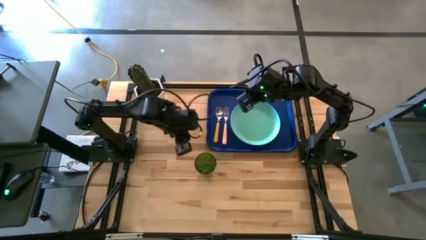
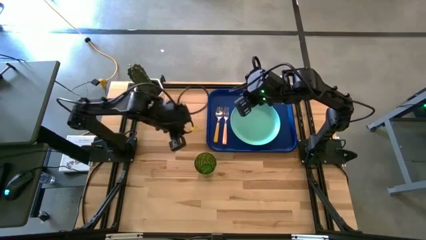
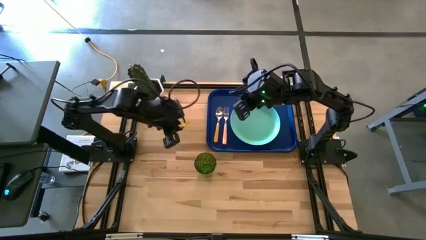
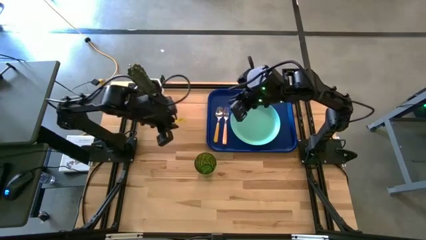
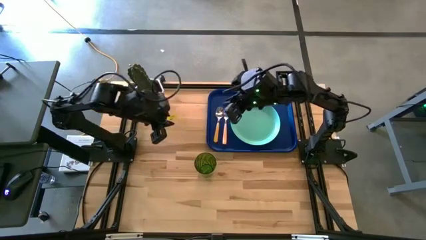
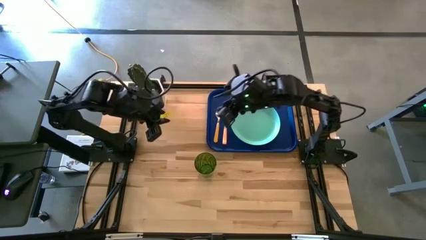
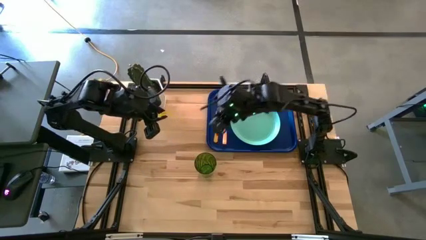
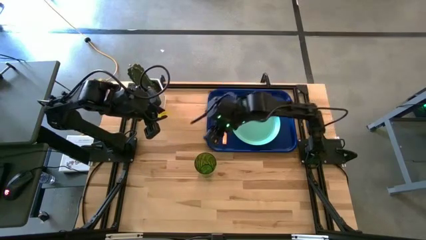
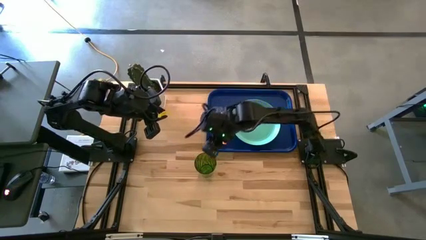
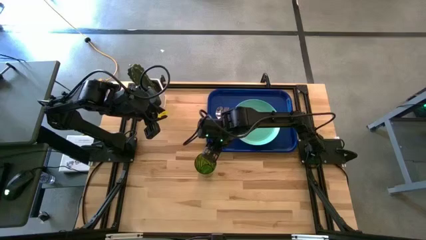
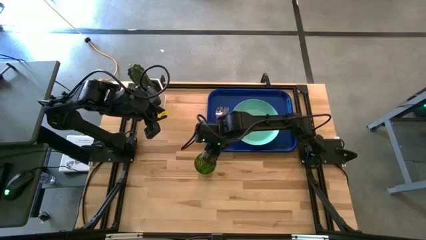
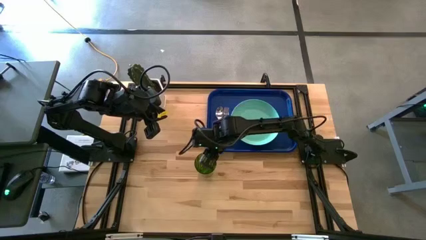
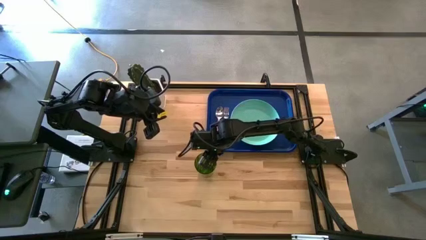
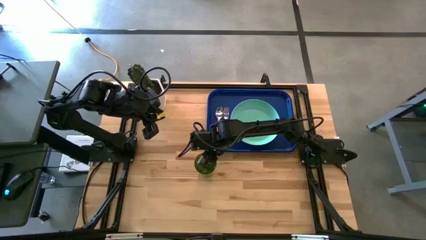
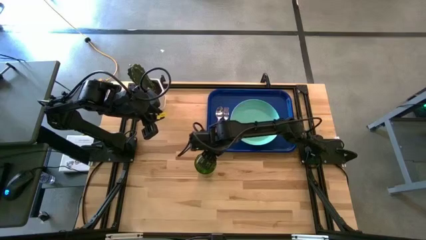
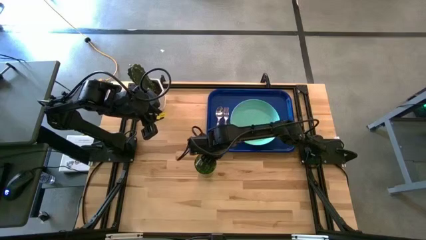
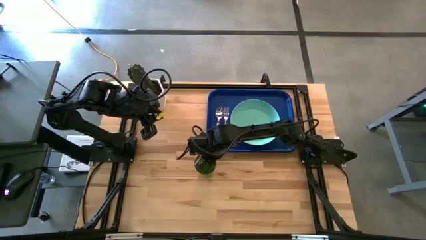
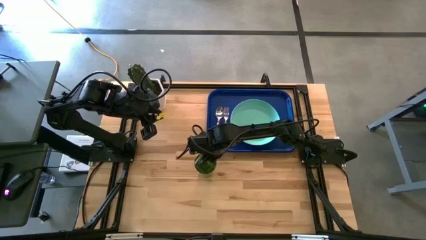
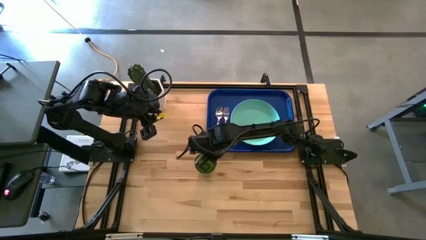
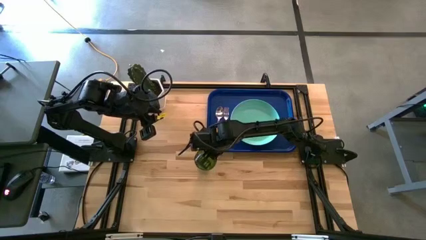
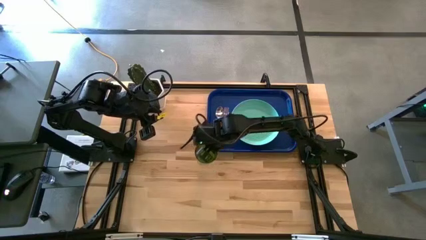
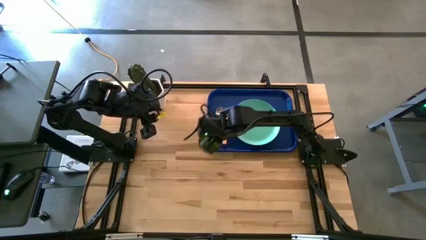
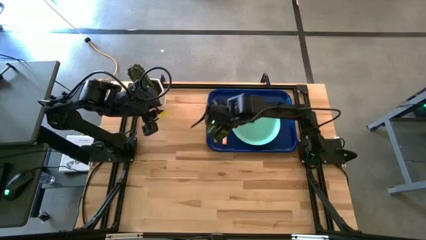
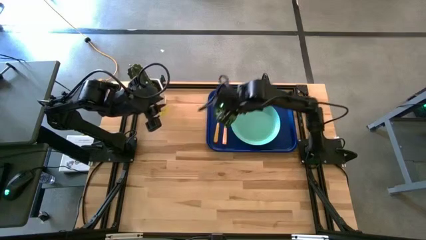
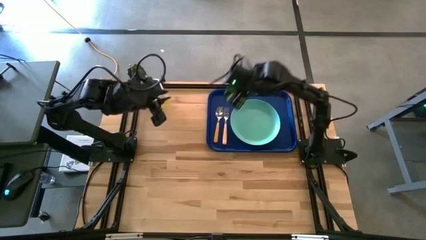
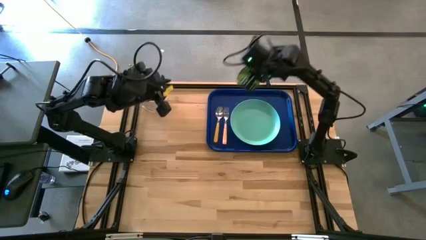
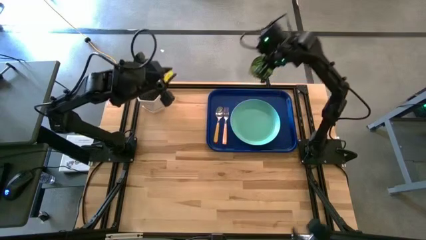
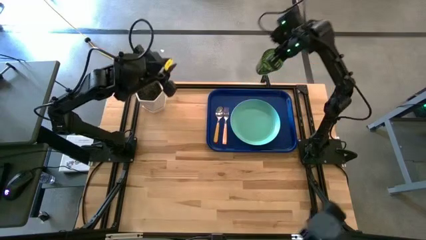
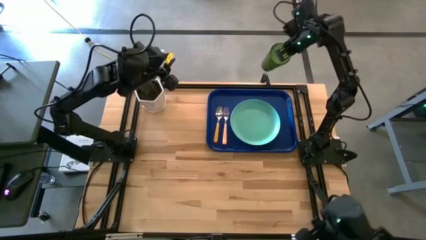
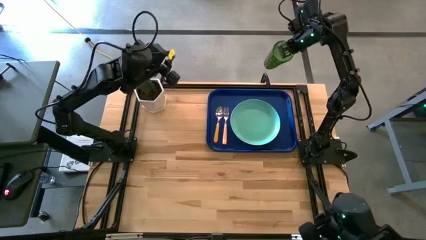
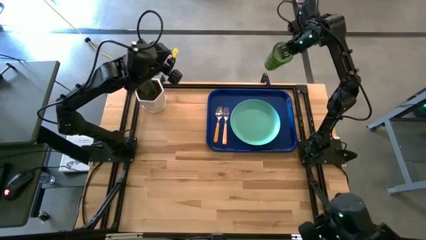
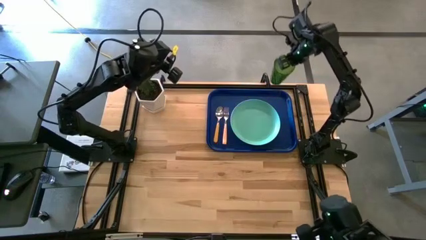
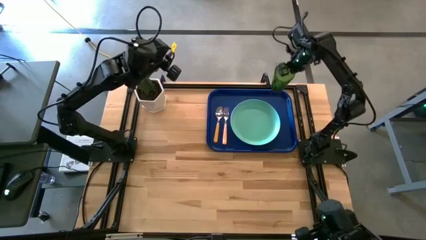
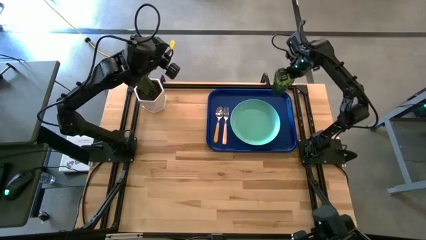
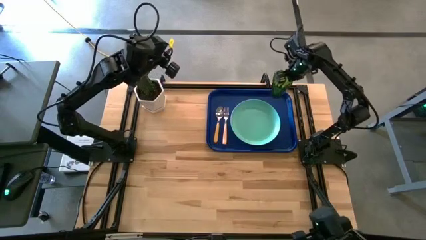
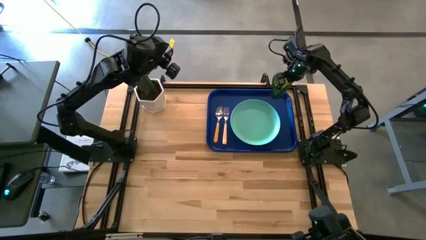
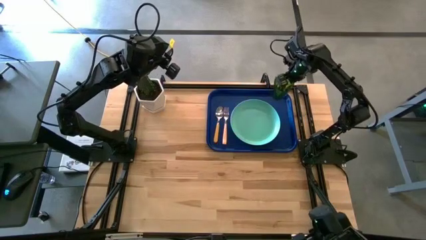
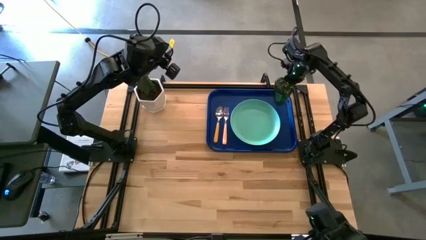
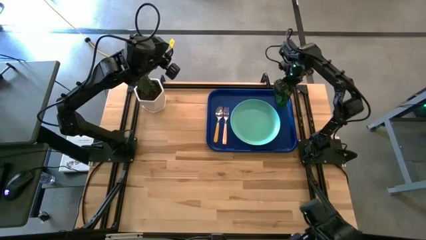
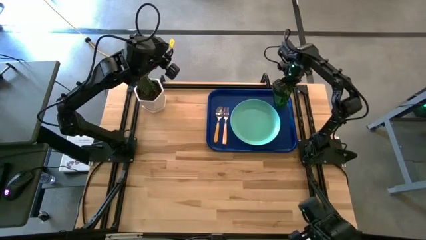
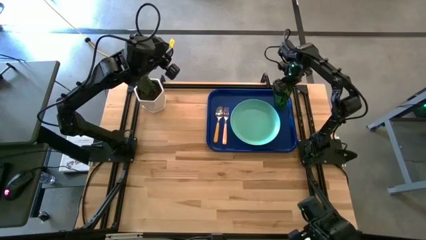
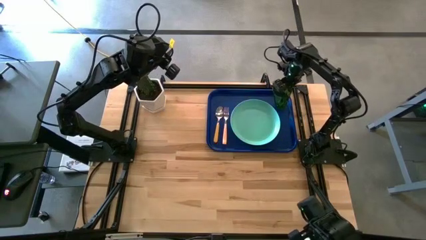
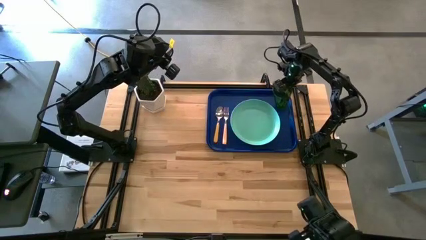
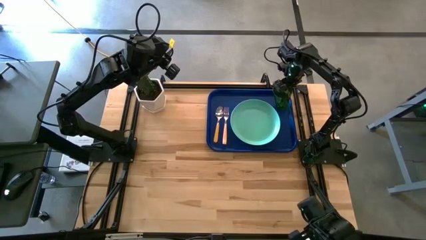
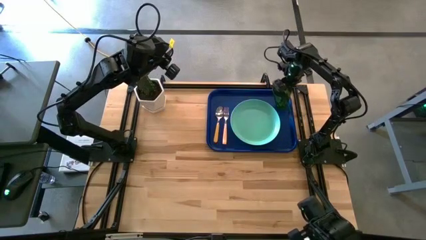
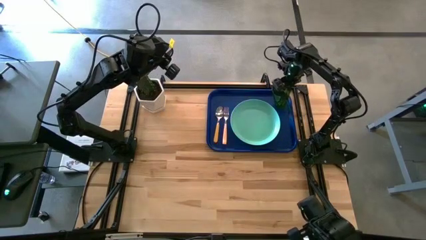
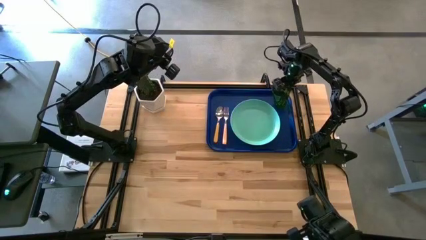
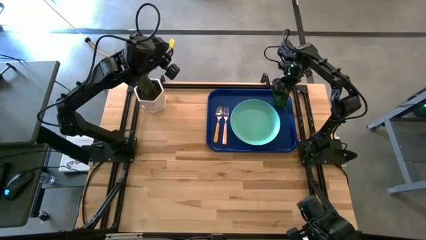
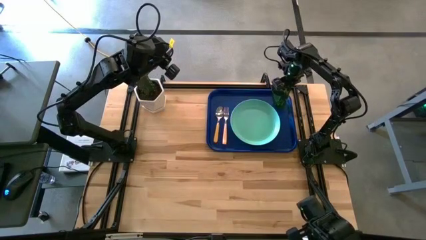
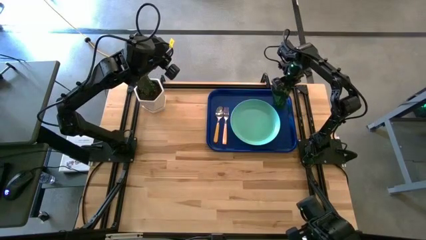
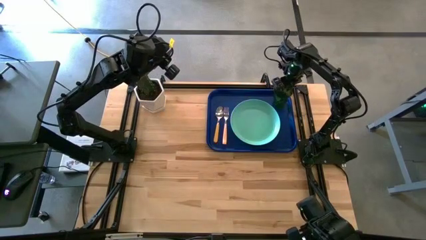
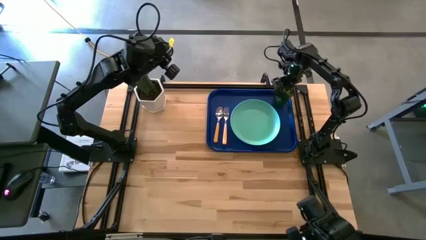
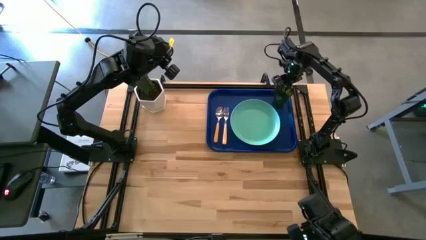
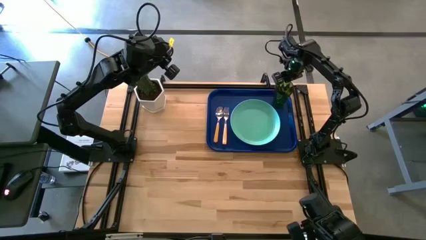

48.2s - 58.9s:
Task: Pick and place plate/cup/fork/spoon on tray
Put the green cup on the top right side of the light green plate on the blue tray

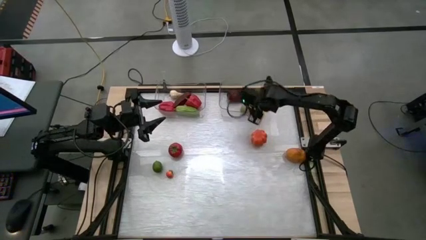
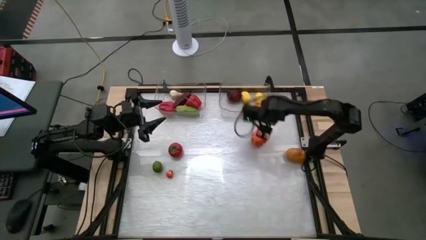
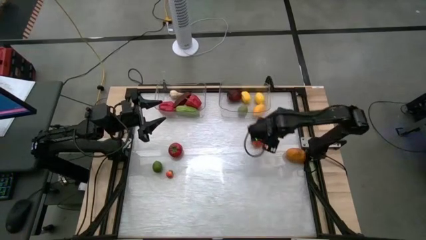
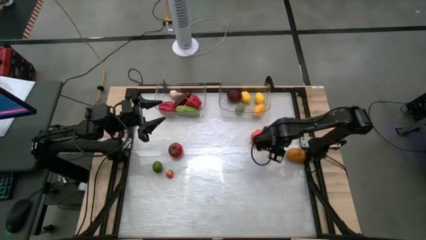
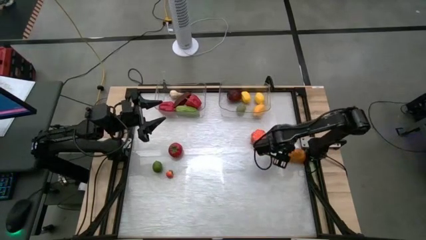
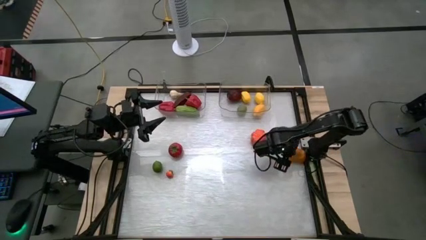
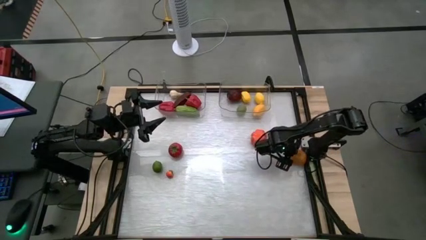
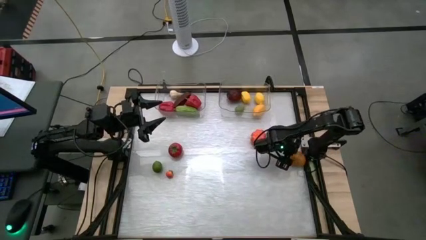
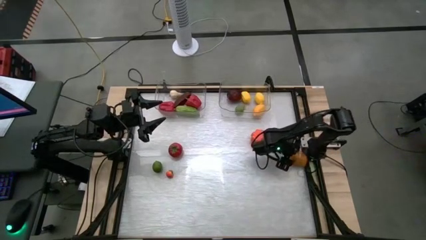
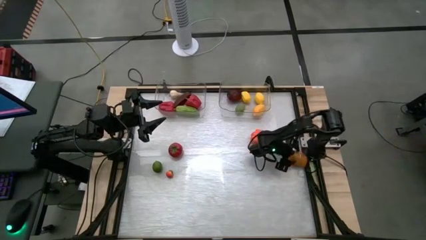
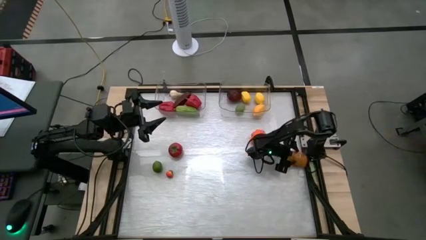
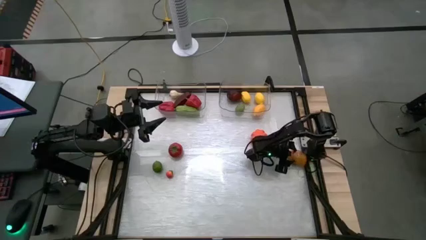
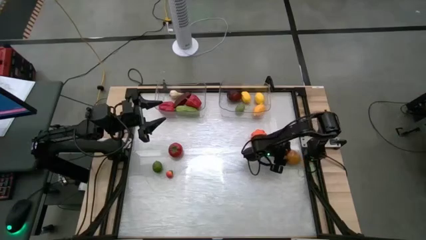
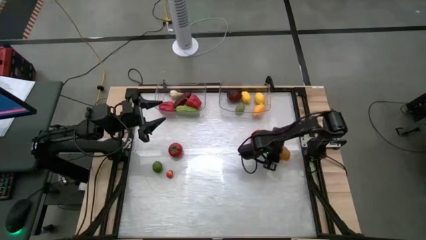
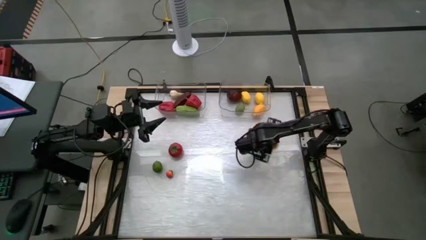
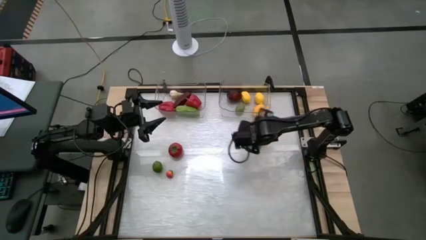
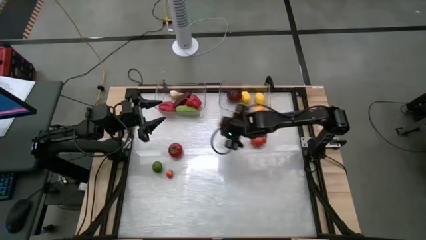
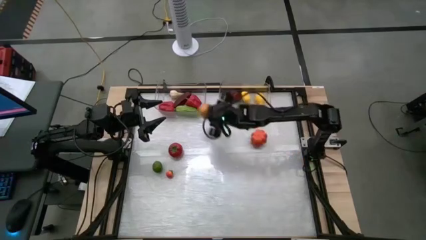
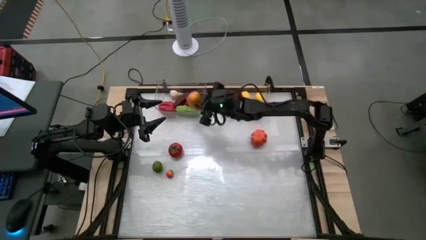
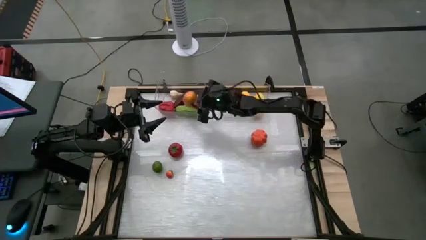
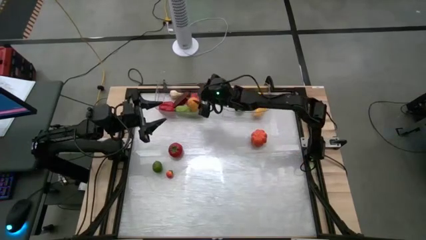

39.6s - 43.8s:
Task: Sort produce into baskets
Put the squash in the container

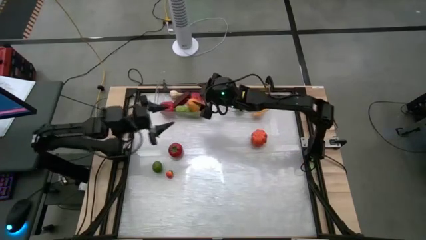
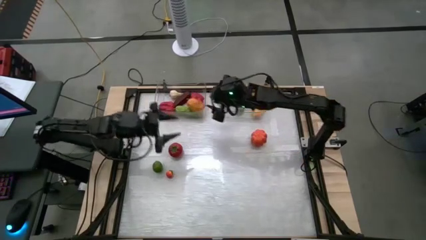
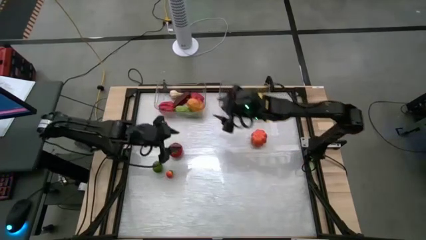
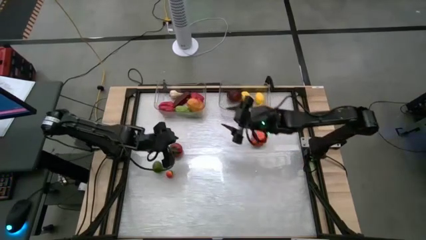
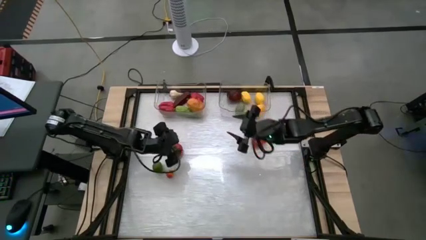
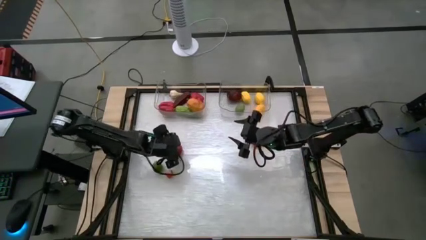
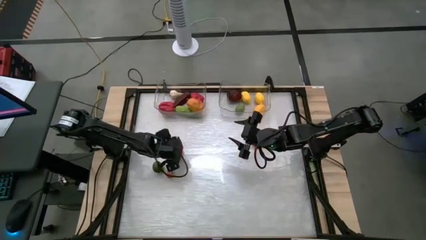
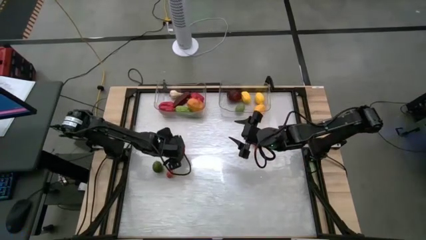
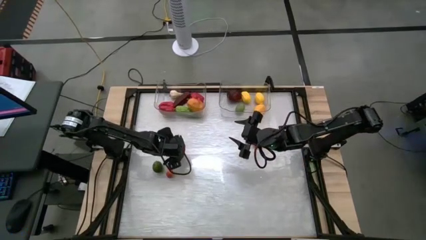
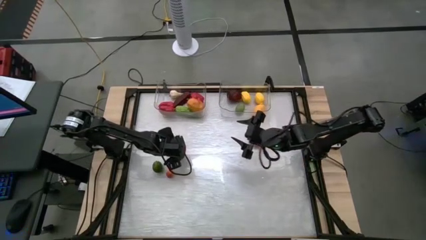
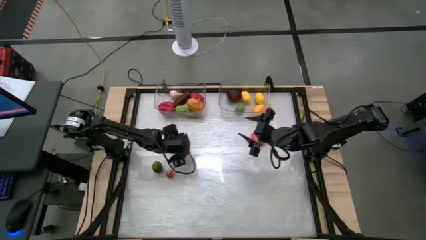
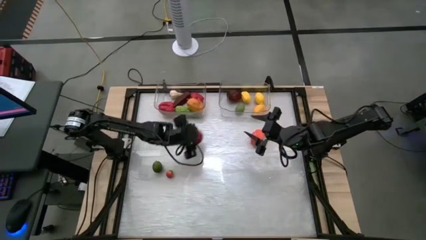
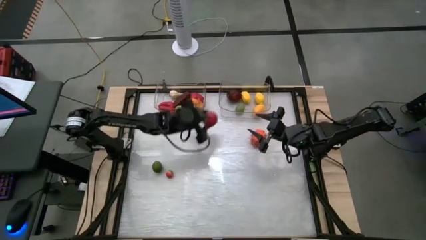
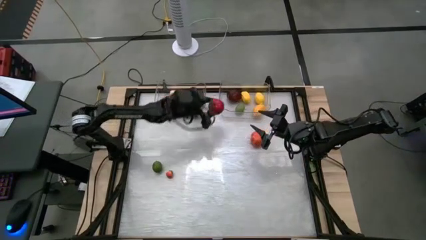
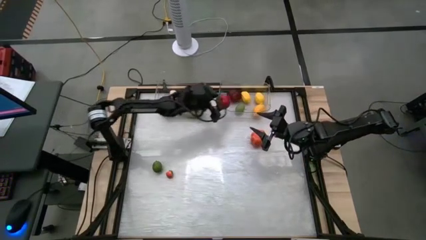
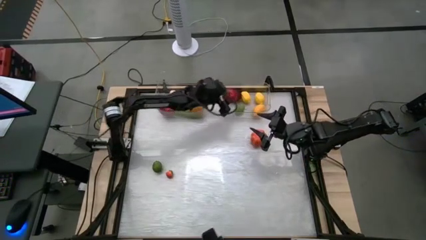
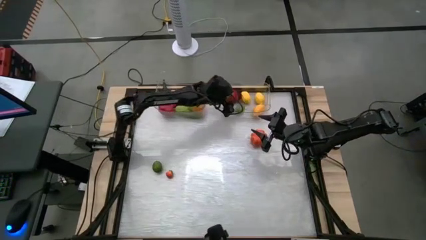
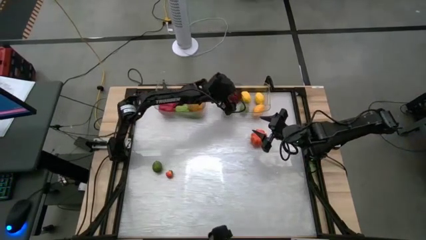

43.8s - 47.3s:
Put the tomato in the container
